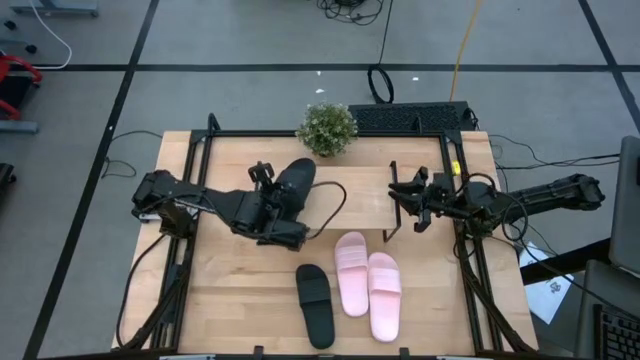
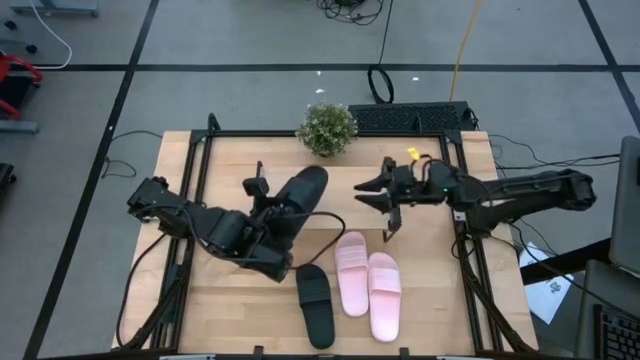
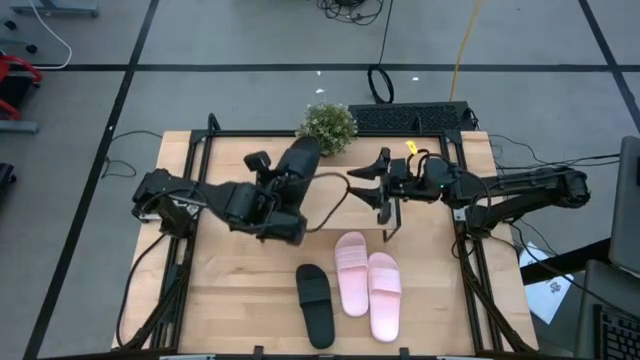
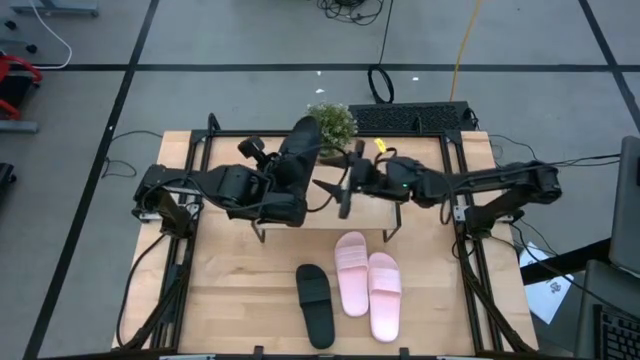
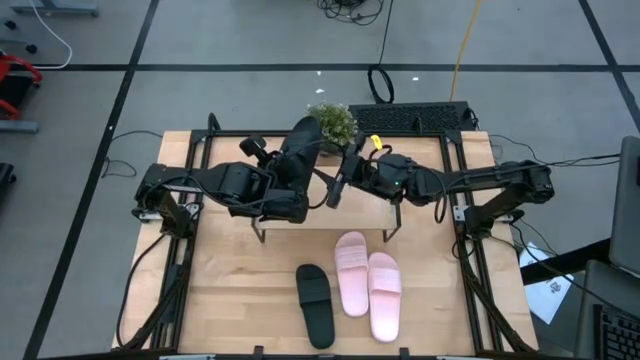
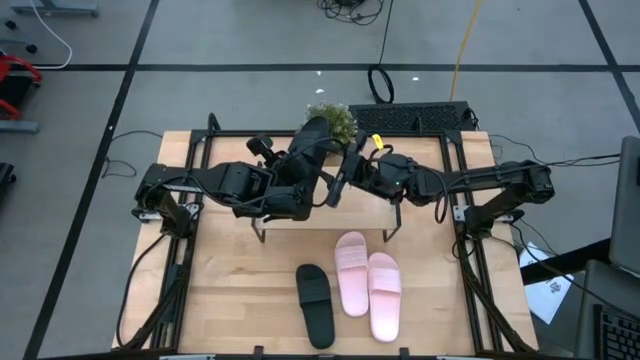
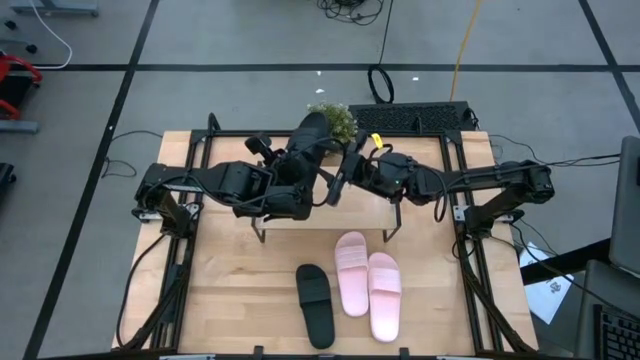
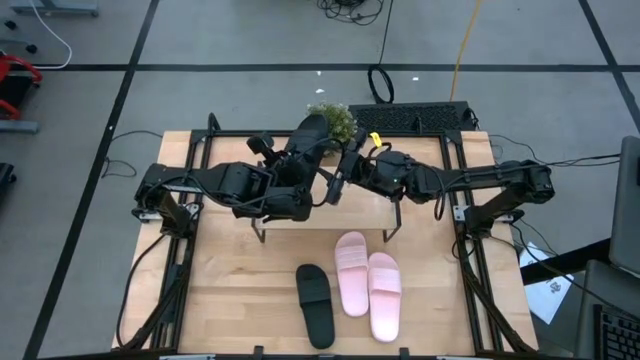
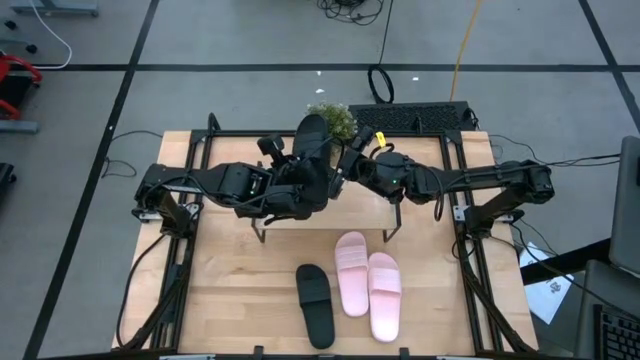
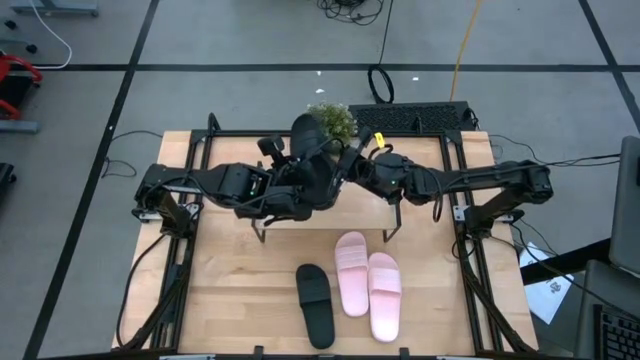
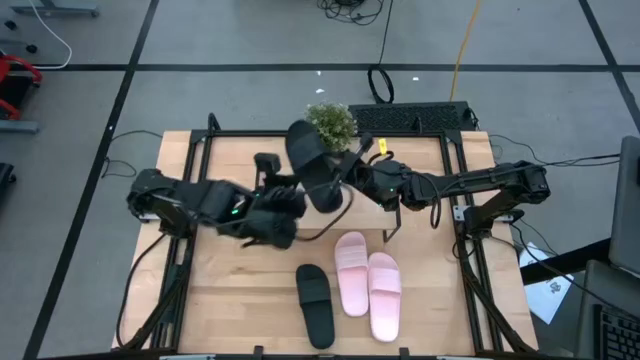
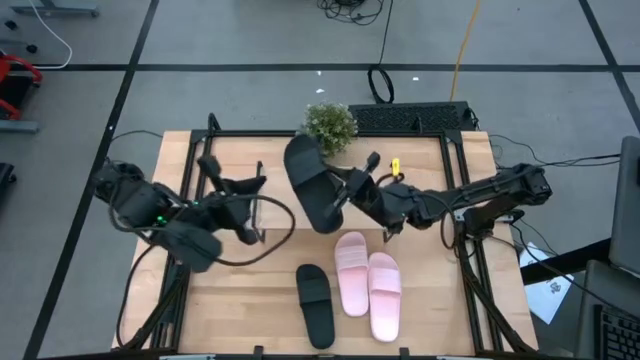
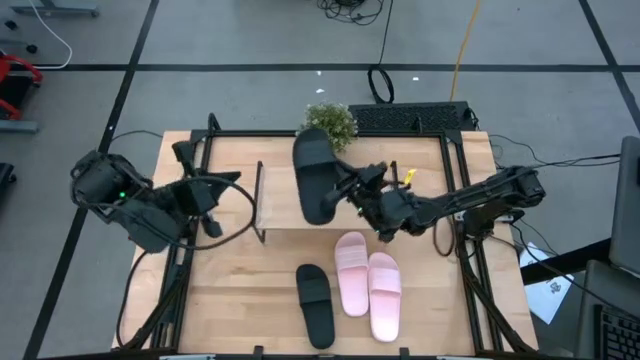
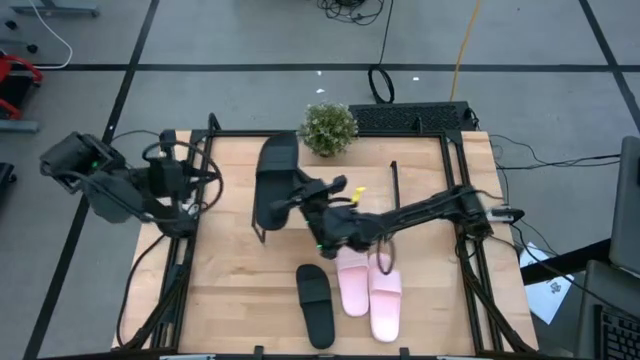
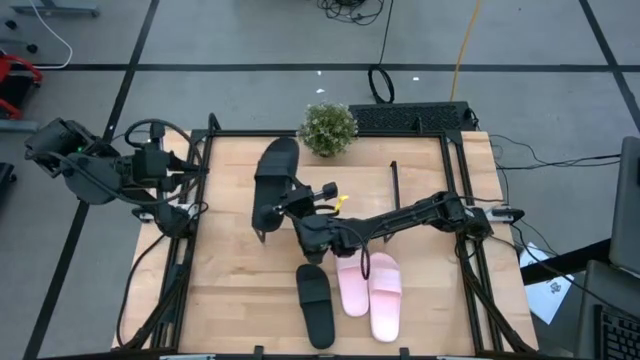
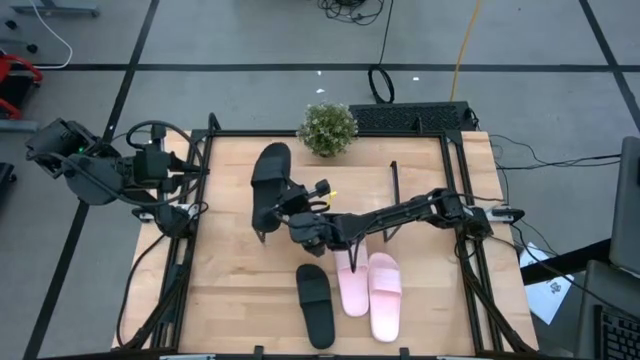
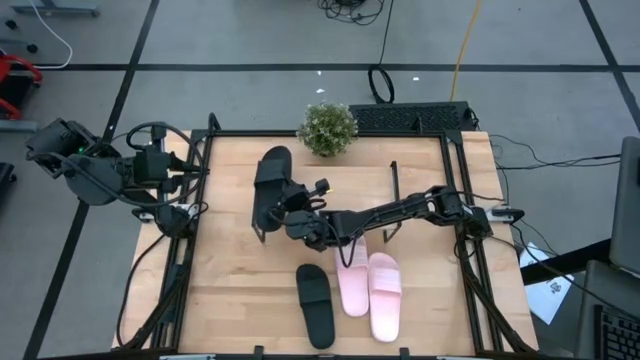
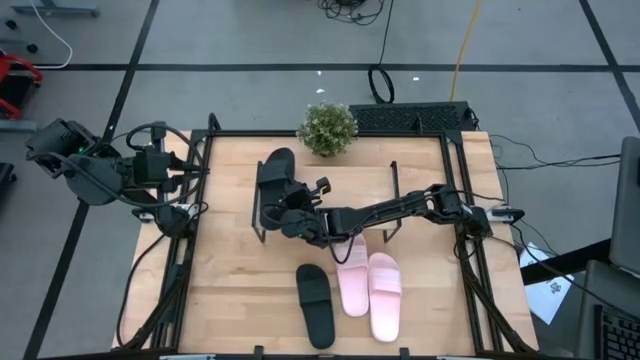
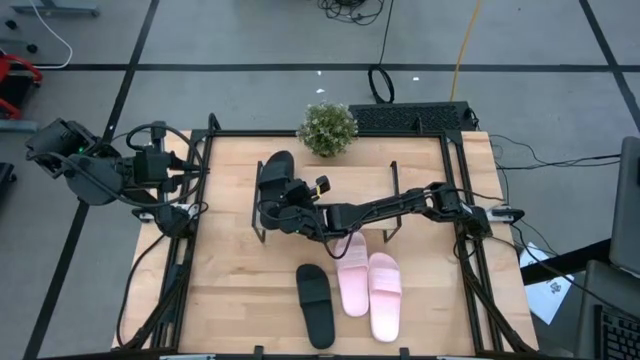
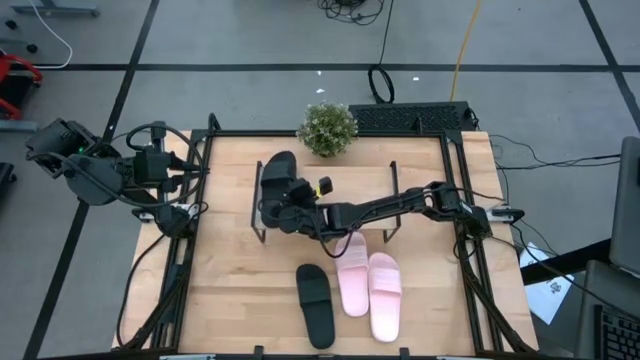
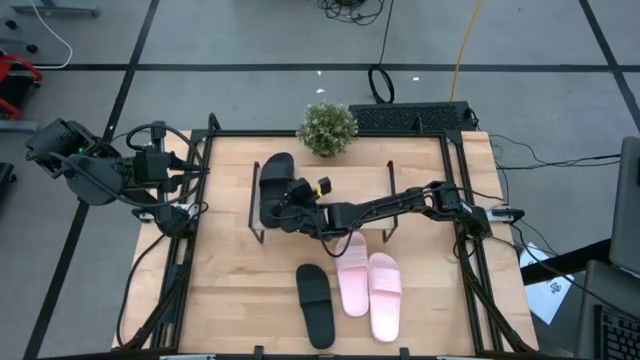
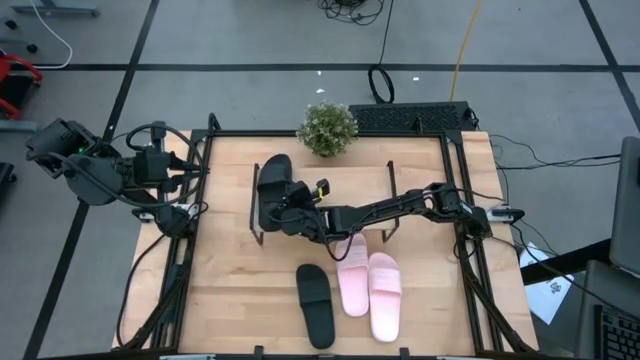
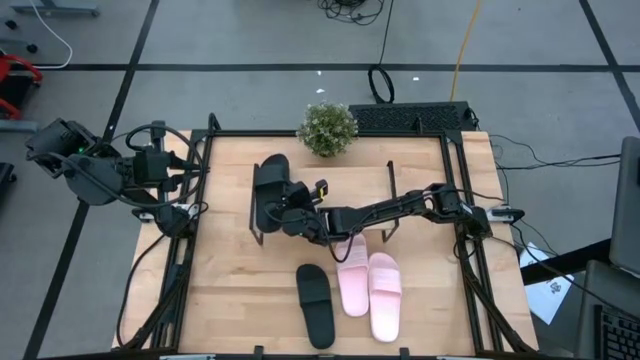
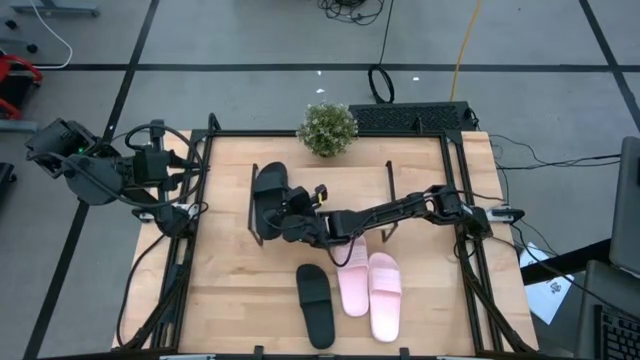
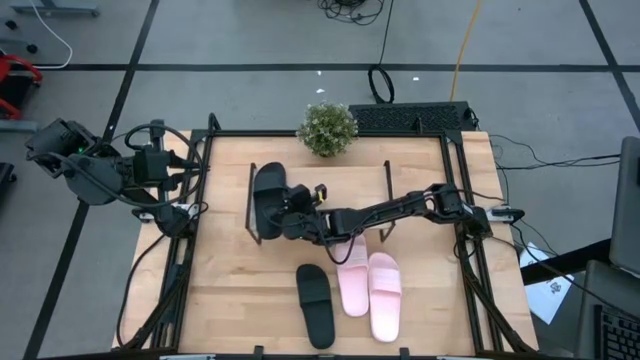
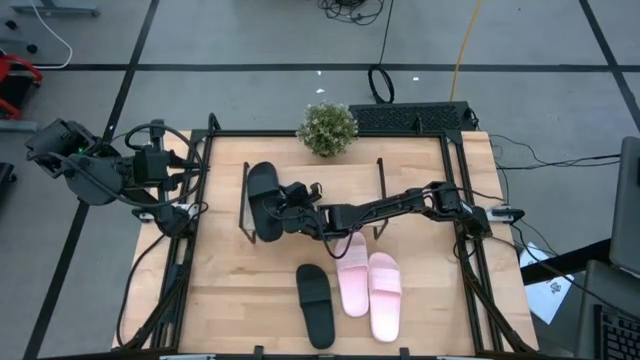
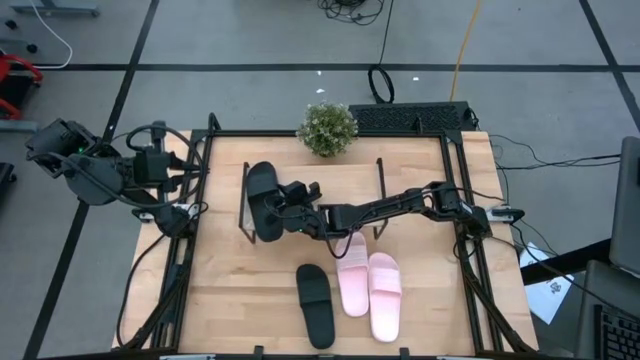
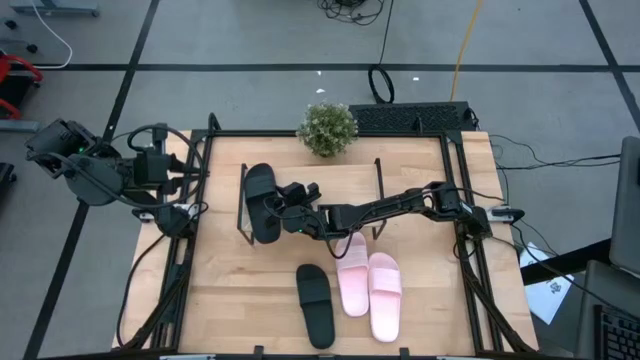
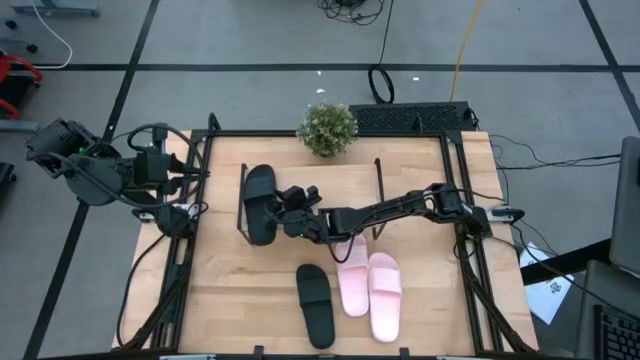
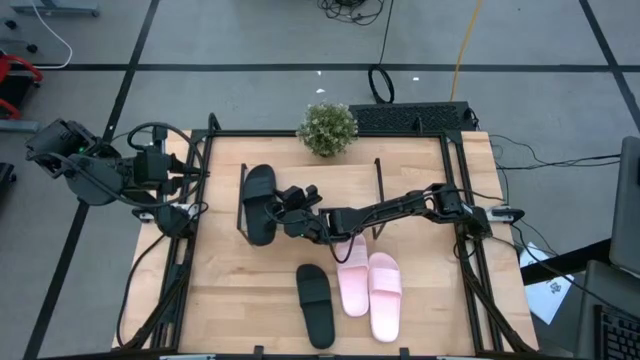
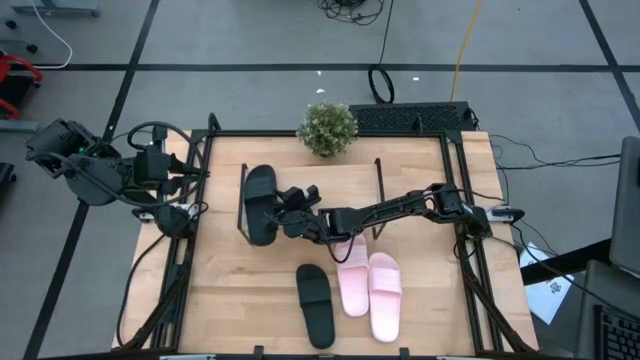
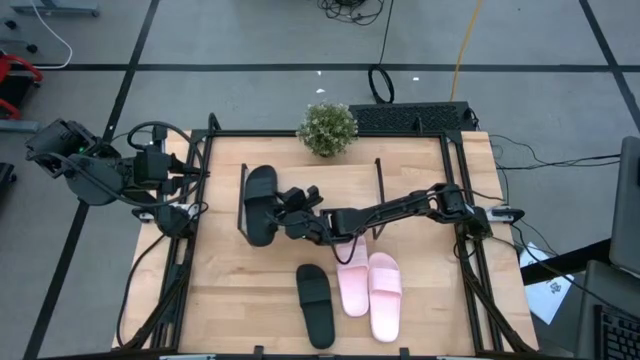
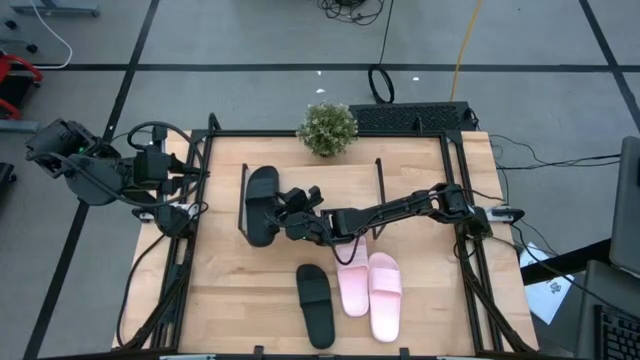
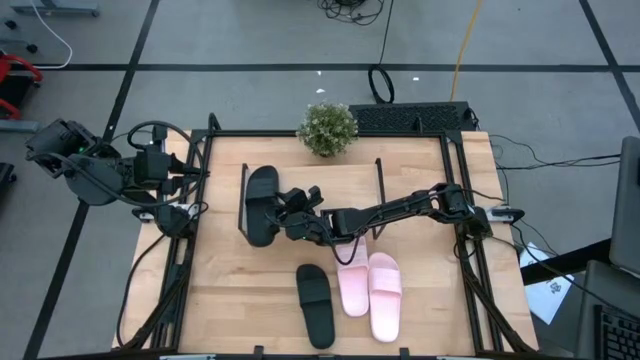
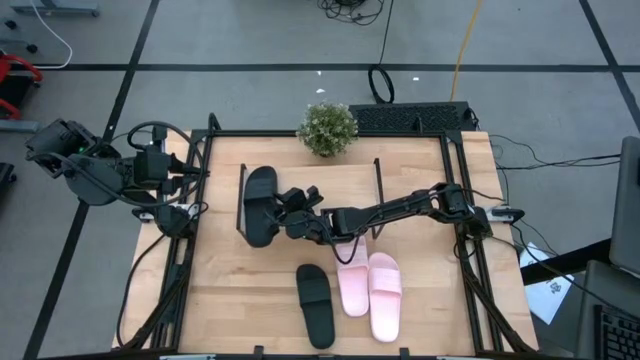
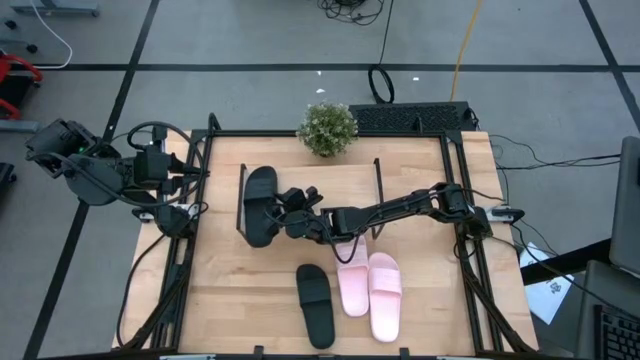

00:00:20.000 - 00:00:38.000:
Task: Pick and place slides into the shelf
Put the black slide on the shelf
